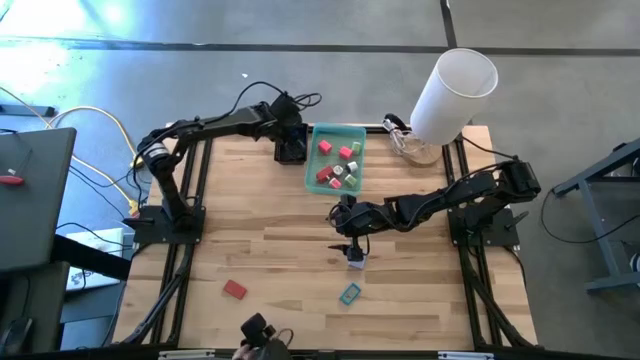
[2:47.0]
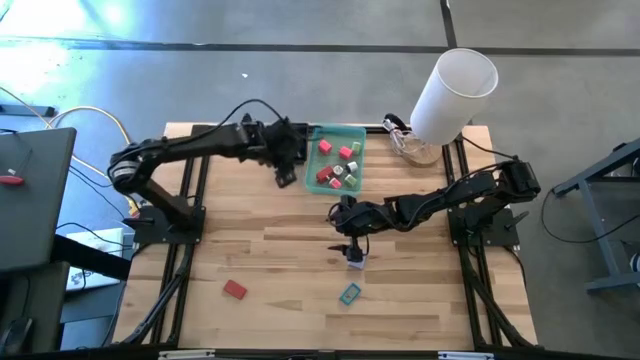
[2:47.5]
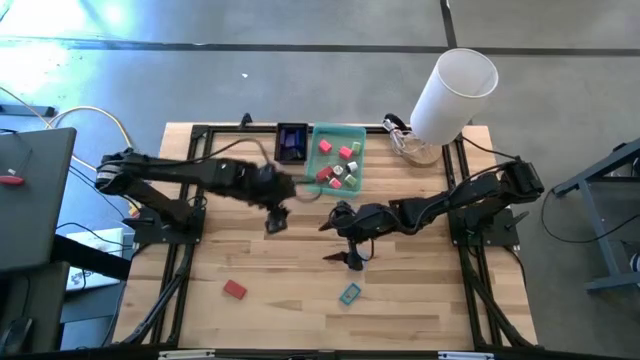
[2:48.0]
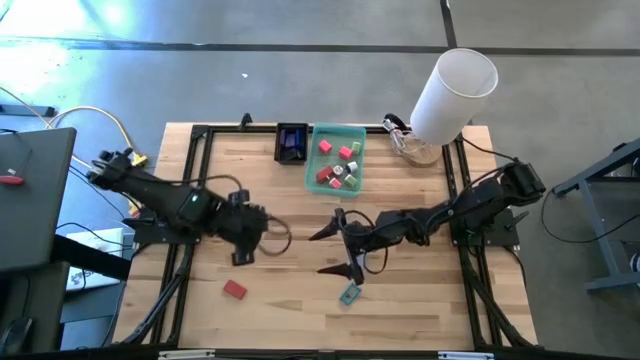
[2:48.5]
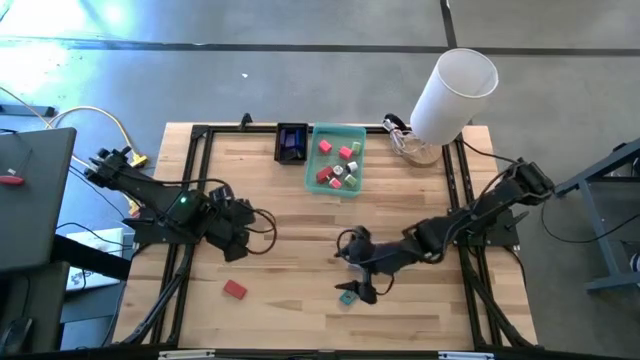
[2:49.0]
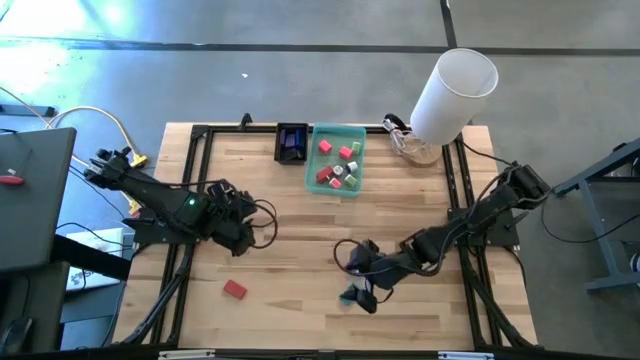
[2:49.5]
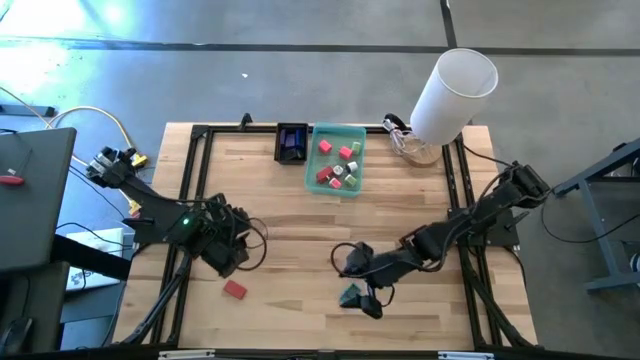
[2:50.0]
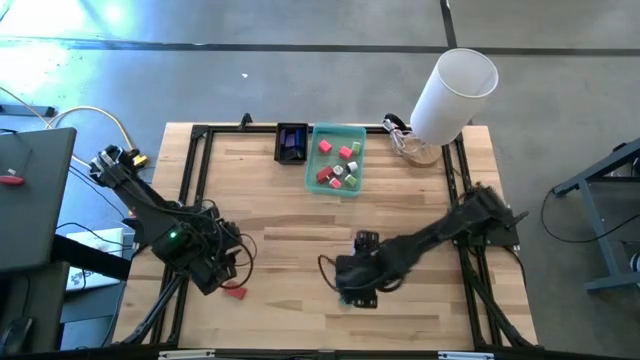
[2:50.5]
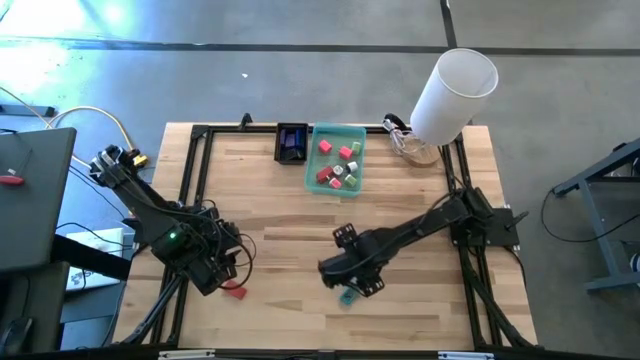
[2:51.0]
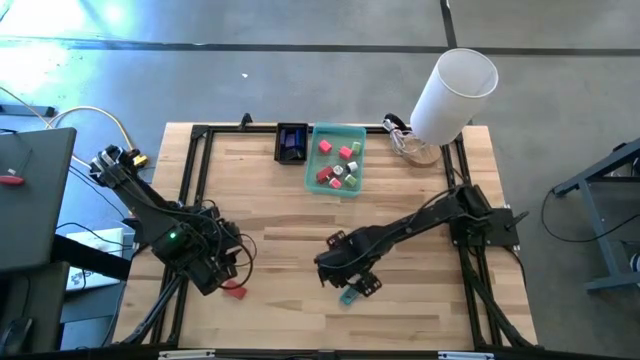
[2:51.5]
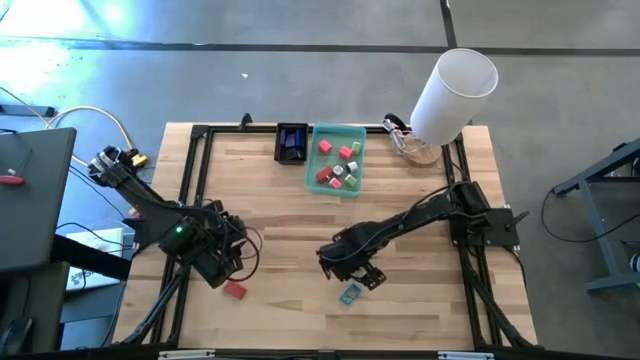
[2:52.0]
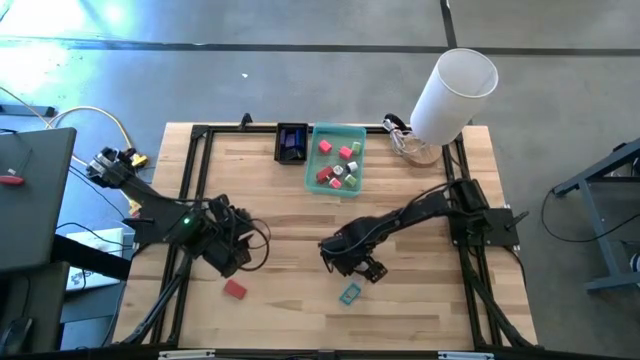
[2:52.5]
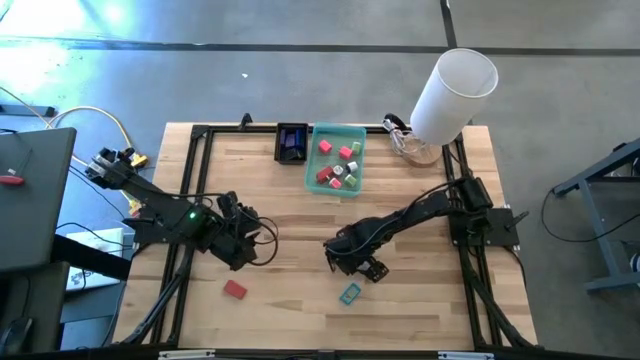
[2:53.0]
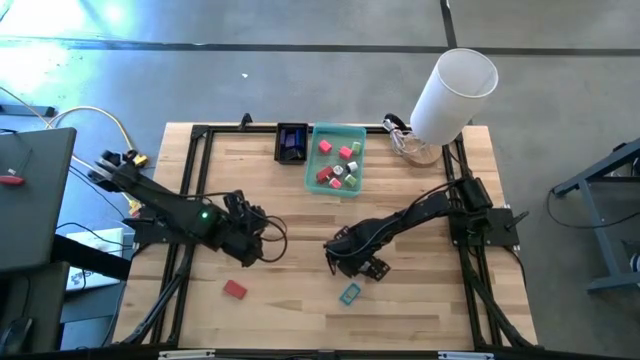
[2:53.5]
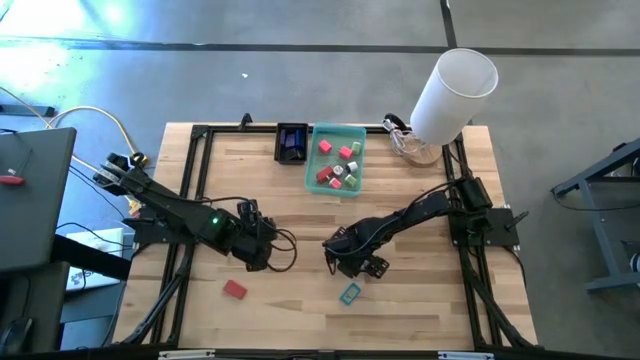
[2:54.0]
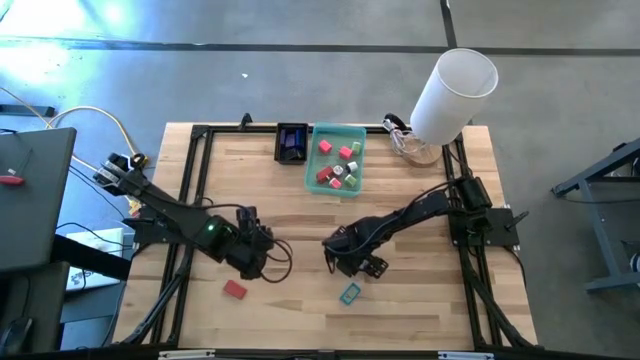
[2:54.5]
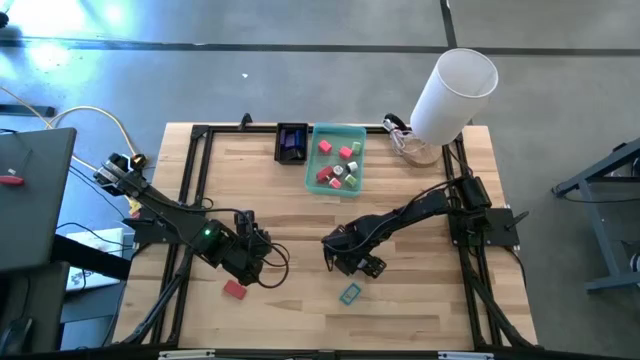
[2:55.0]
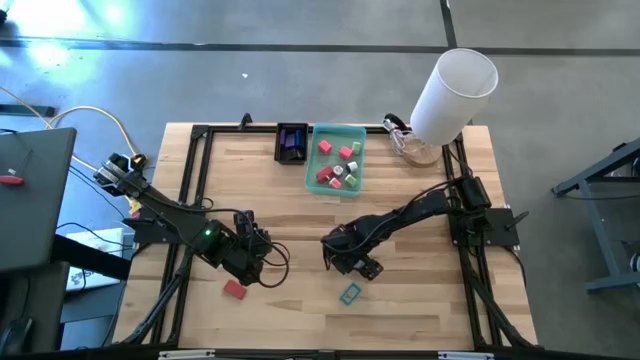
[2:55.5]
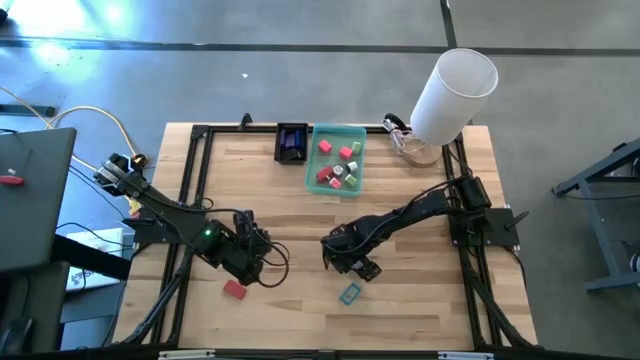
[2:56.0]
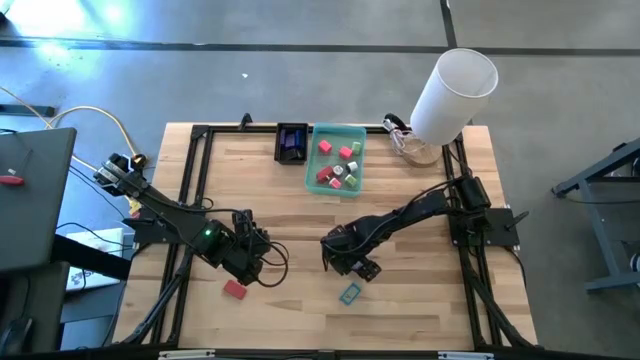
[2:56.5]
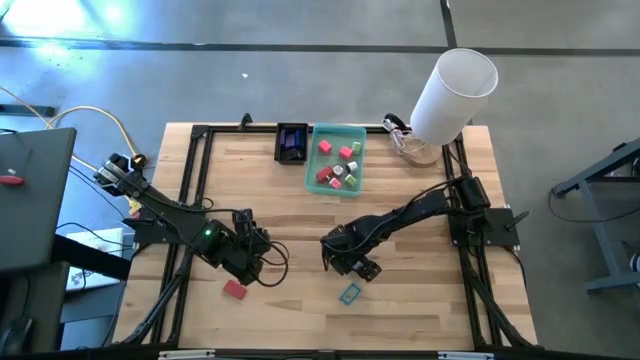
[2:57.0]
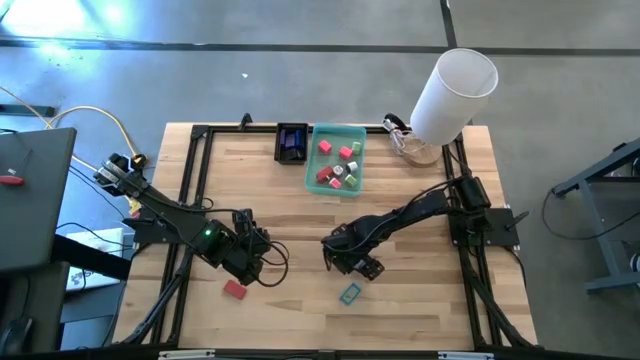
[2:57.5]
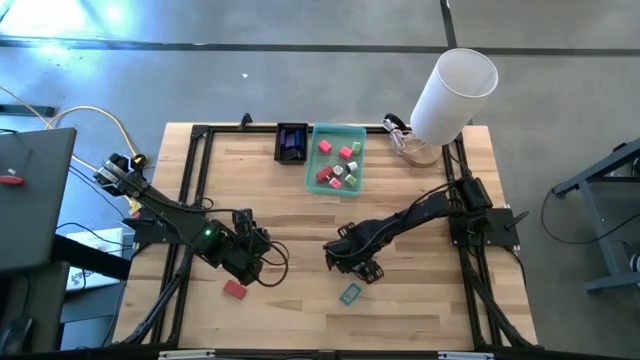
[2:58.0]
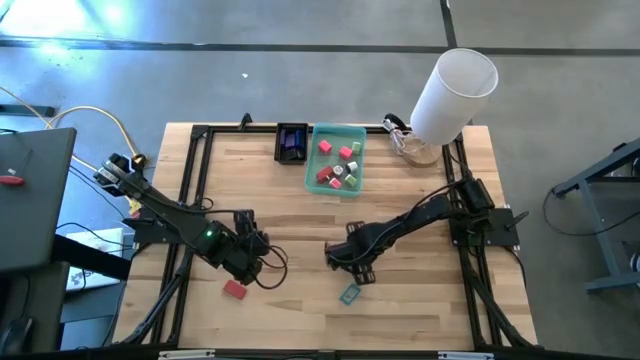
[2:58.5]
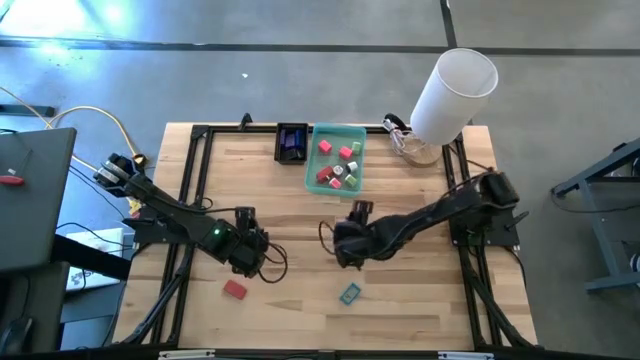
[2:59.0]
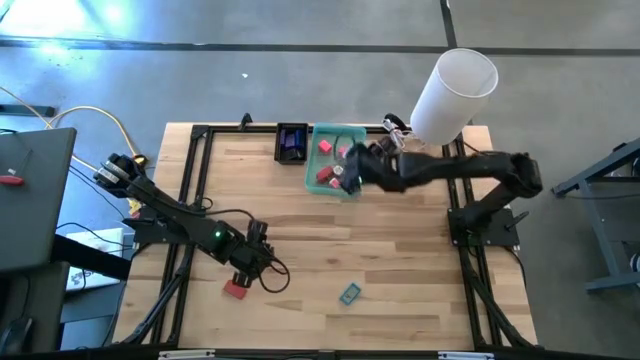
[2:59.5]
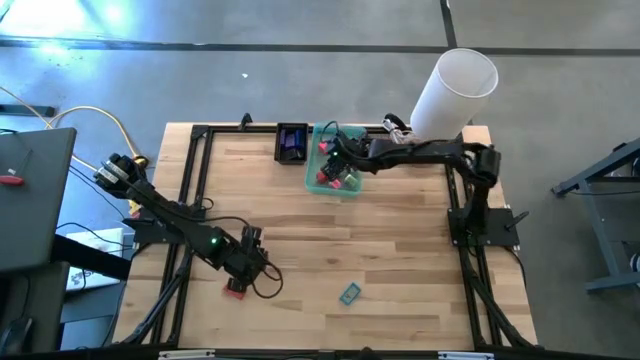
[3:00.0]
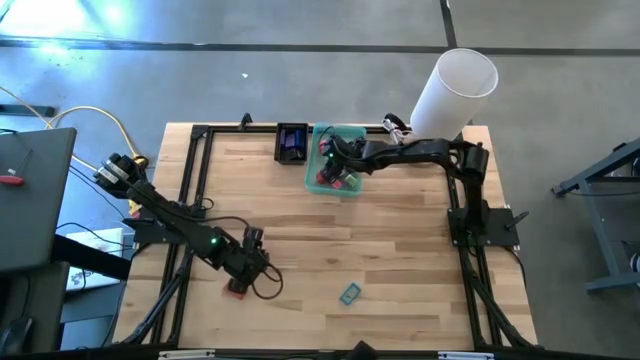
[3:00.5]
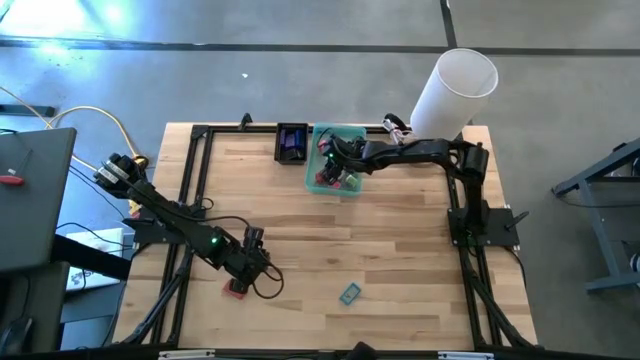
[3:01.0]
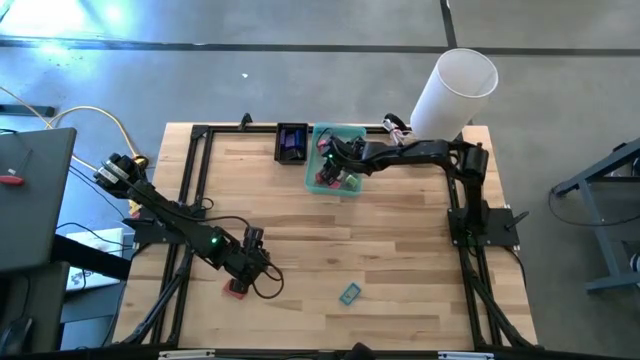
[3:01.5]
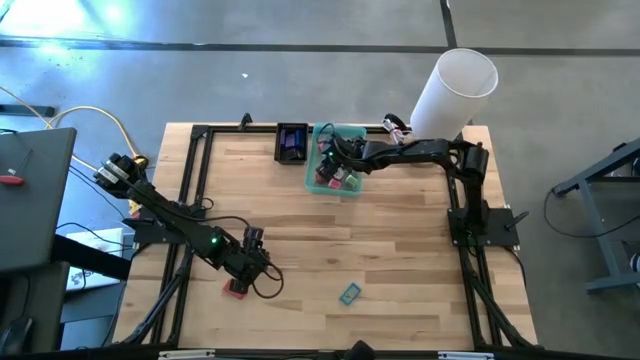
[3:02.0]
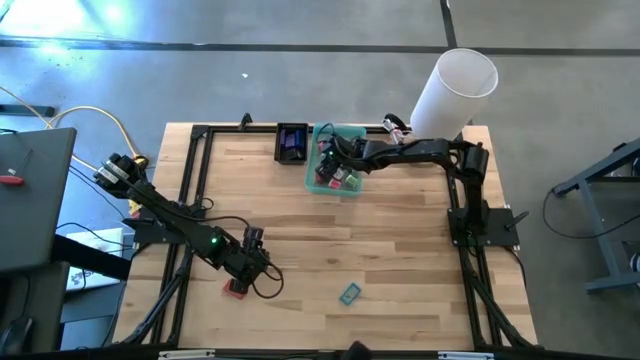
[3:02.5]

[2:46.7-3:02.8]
Task: Pick & Place Office items
Put the light purple charger adapter into the green bin

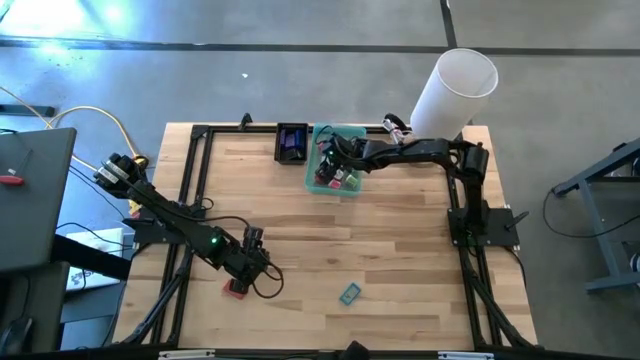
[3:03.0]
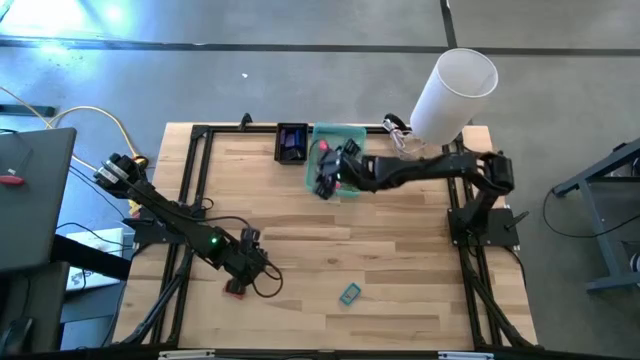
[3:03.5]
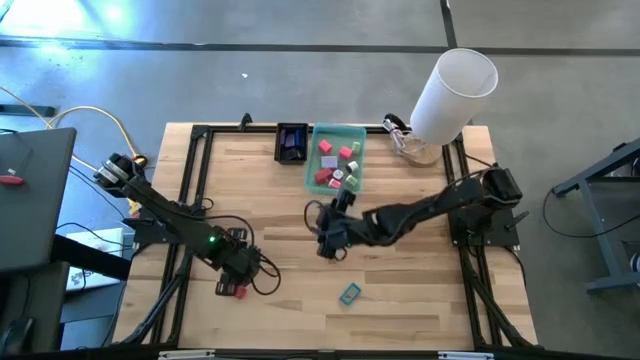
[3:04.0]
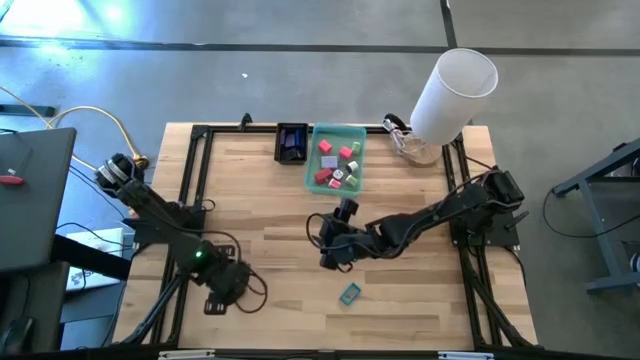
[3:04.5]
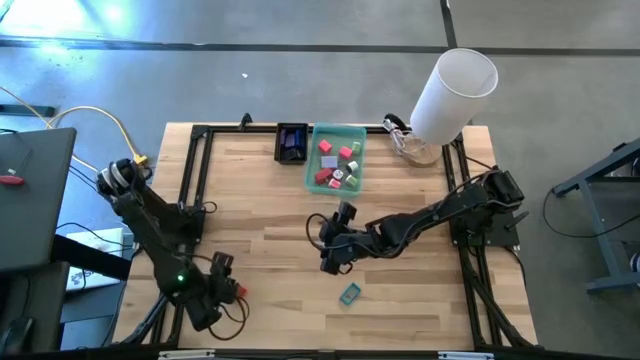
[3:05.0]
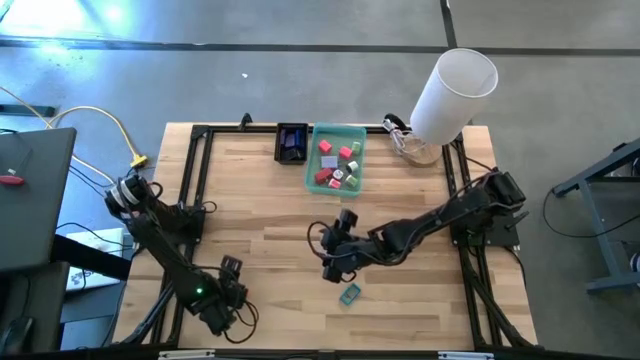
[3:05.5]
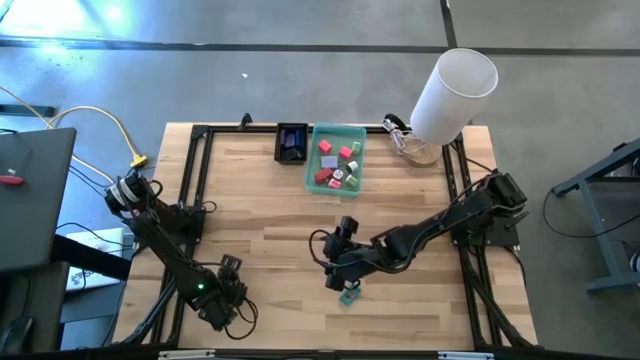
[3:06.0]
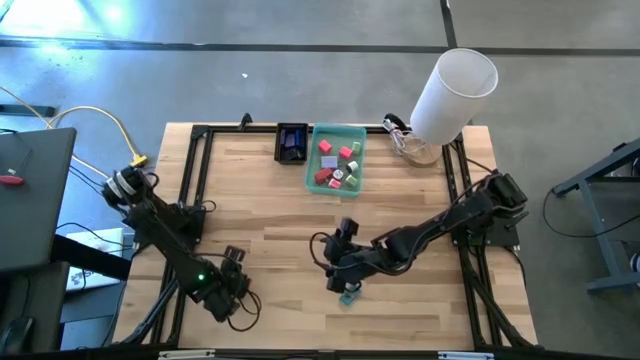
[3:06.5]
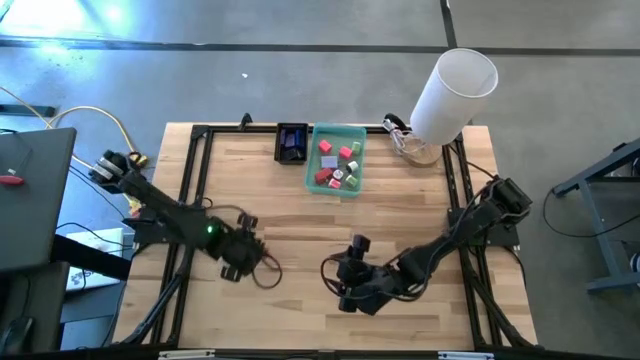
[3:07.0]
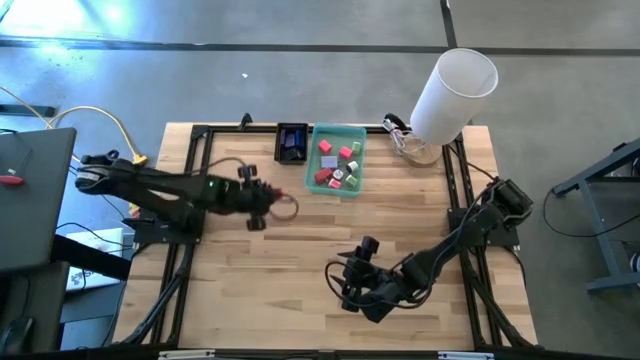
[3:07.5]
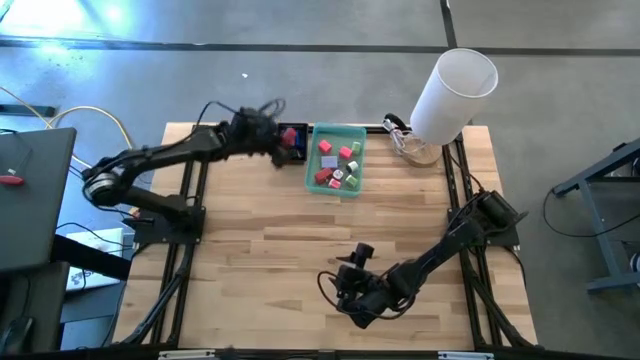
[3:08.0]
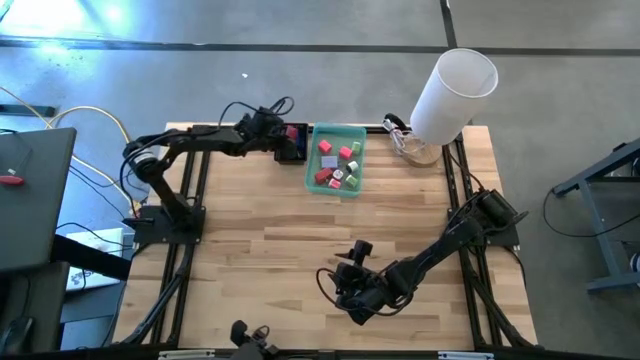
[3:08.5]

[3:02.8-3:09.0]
Put the red digital clock into the black bin
